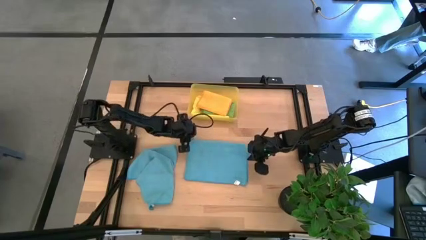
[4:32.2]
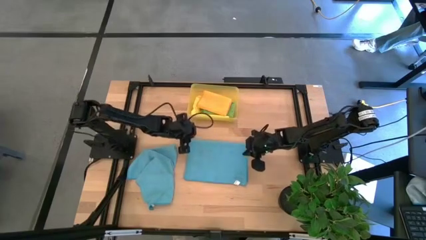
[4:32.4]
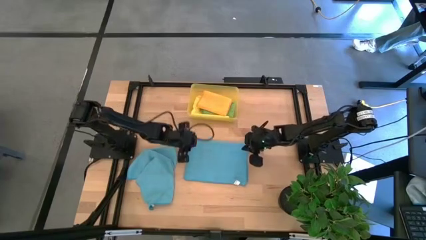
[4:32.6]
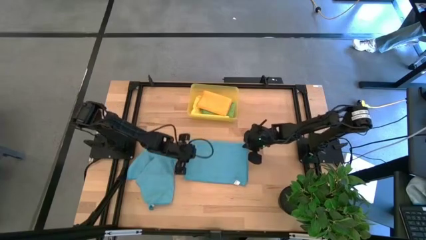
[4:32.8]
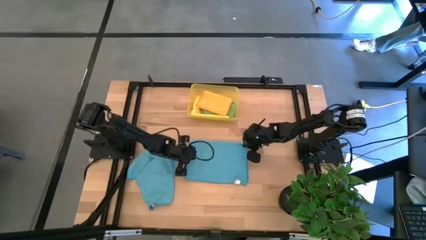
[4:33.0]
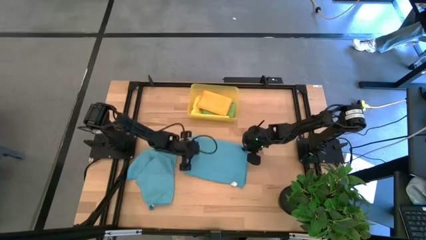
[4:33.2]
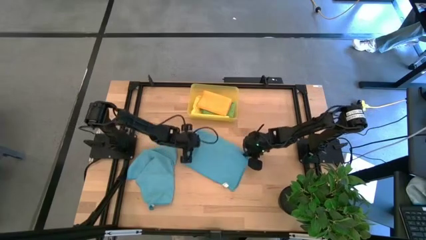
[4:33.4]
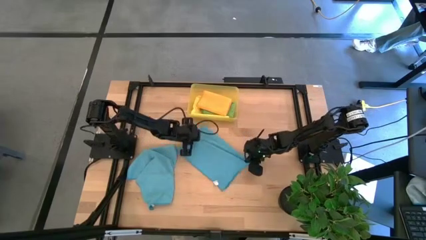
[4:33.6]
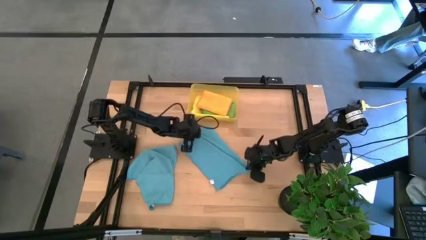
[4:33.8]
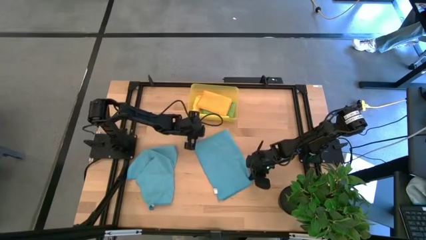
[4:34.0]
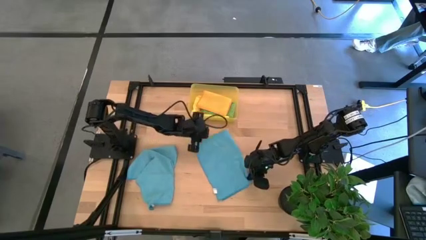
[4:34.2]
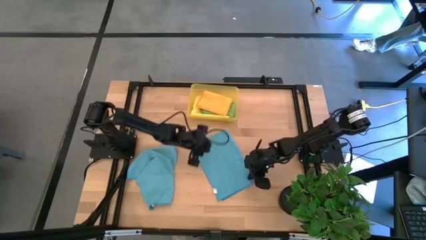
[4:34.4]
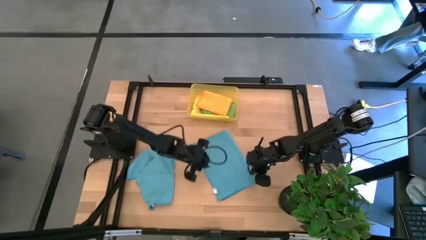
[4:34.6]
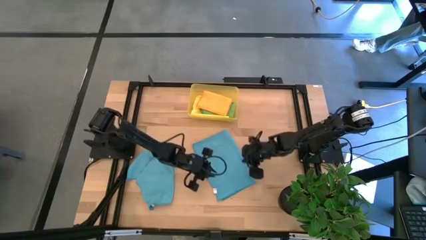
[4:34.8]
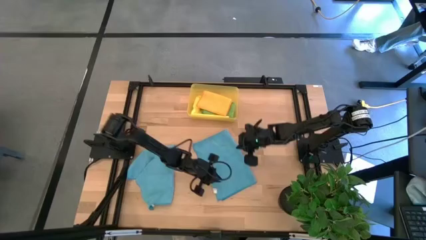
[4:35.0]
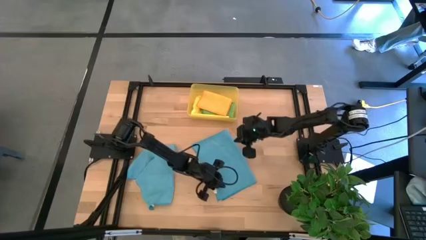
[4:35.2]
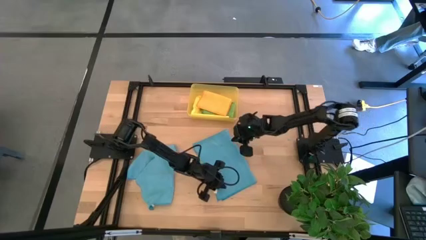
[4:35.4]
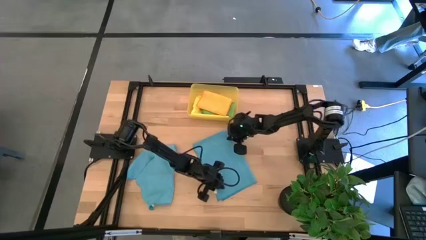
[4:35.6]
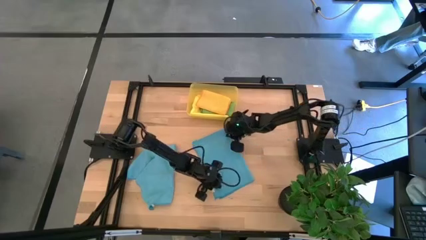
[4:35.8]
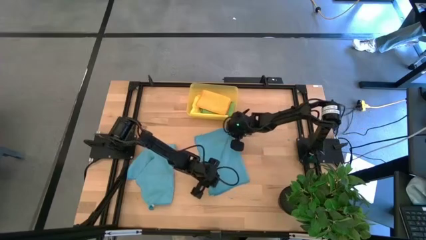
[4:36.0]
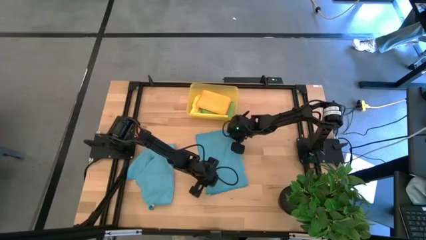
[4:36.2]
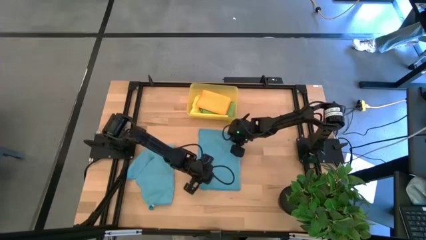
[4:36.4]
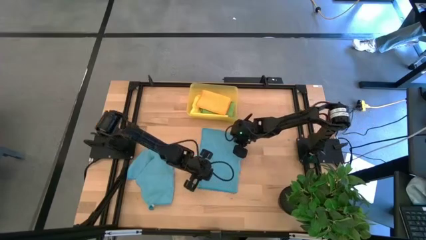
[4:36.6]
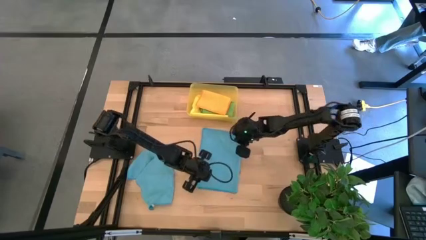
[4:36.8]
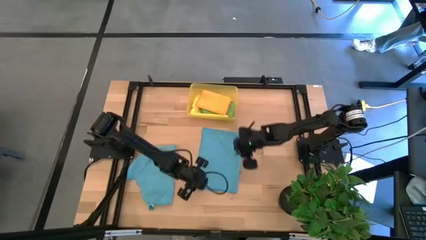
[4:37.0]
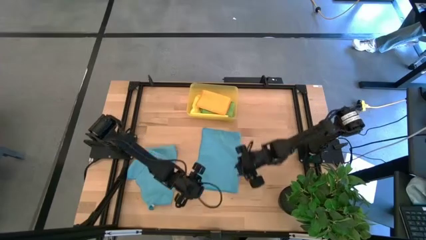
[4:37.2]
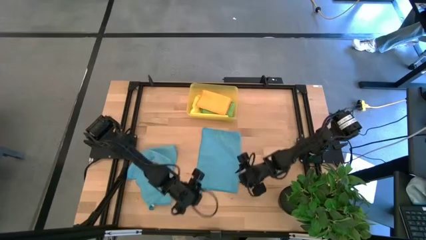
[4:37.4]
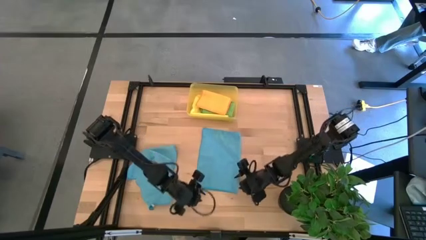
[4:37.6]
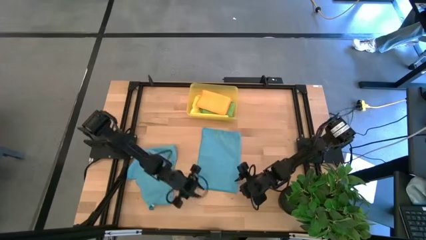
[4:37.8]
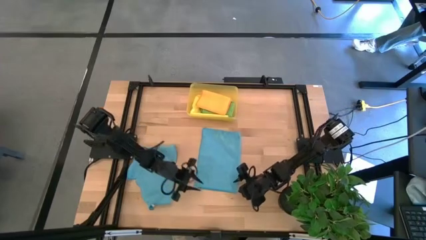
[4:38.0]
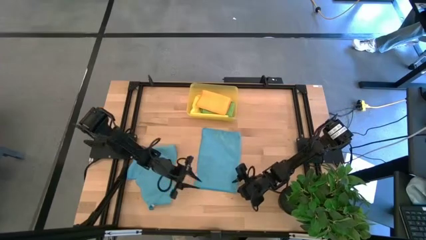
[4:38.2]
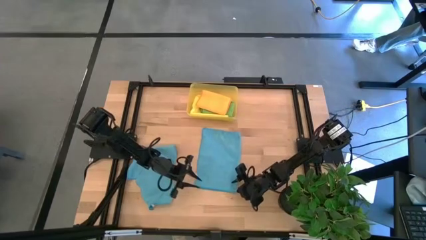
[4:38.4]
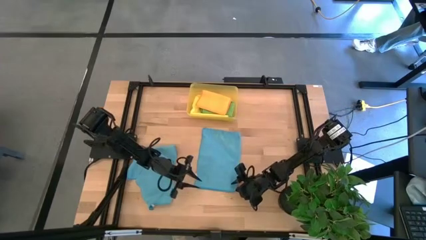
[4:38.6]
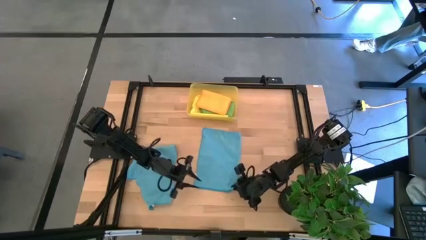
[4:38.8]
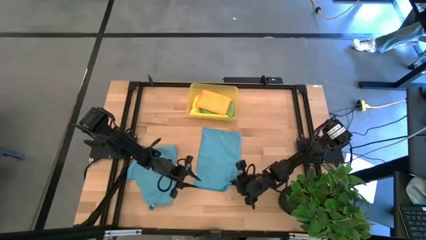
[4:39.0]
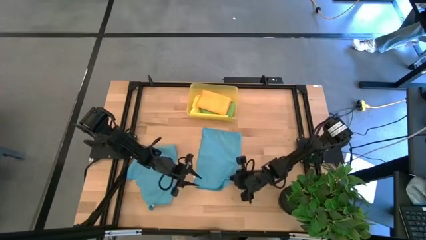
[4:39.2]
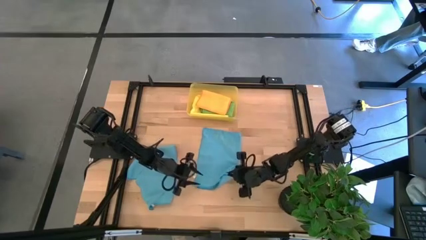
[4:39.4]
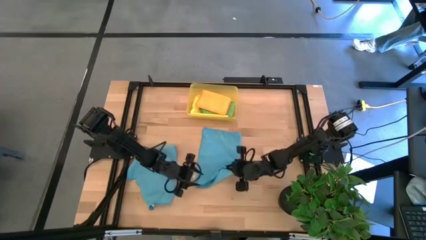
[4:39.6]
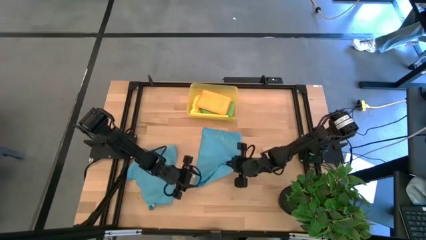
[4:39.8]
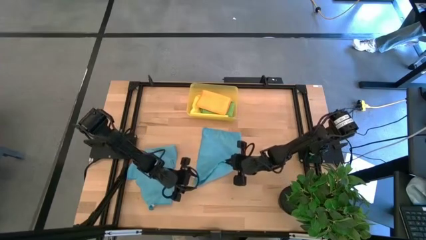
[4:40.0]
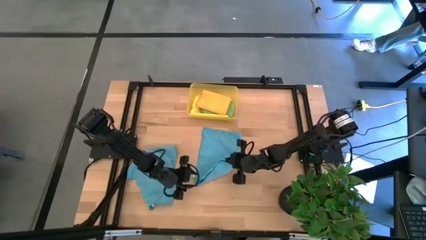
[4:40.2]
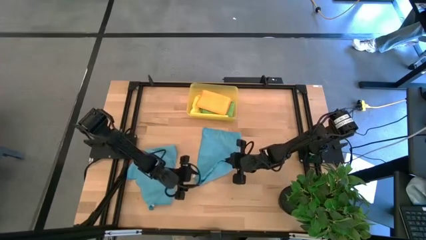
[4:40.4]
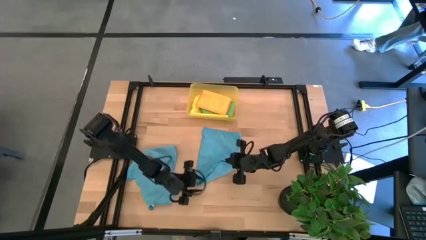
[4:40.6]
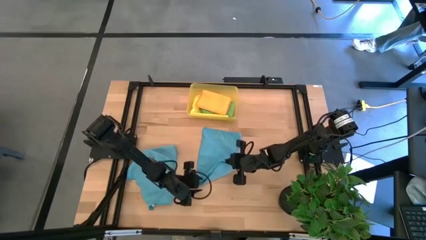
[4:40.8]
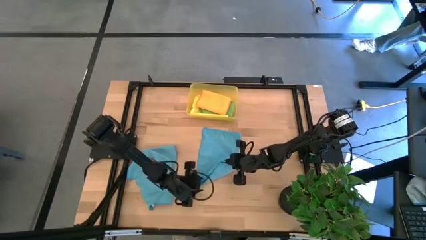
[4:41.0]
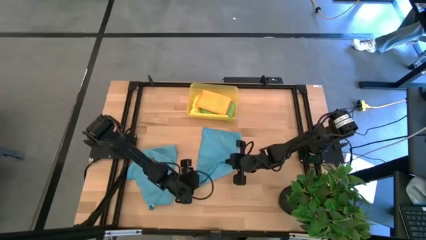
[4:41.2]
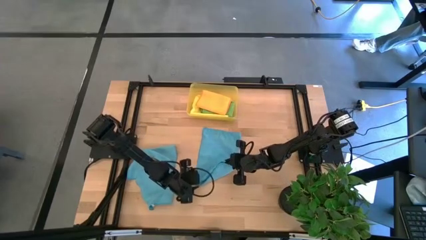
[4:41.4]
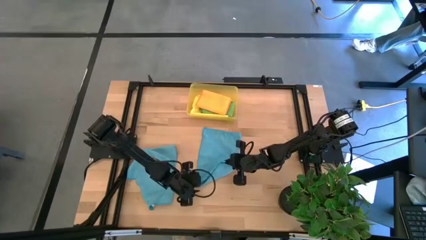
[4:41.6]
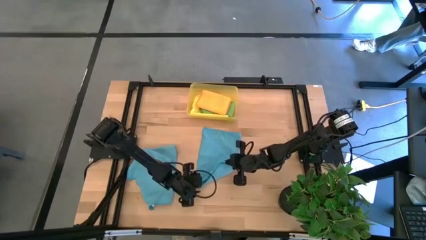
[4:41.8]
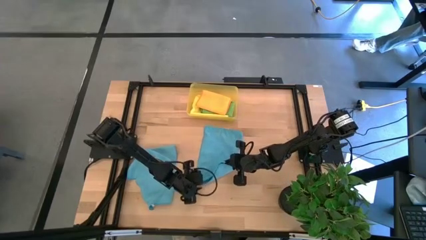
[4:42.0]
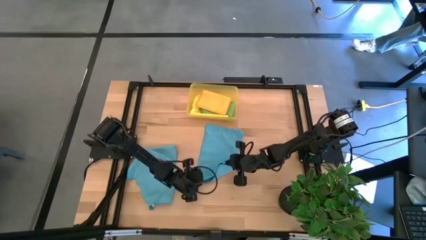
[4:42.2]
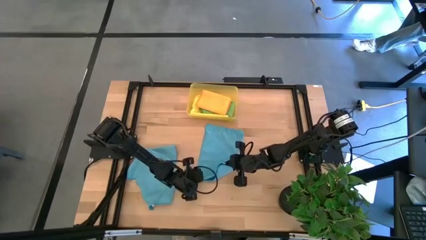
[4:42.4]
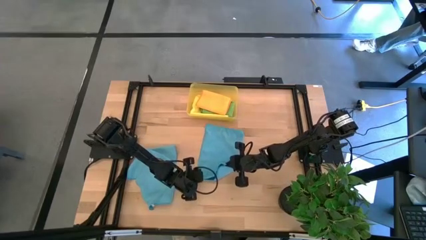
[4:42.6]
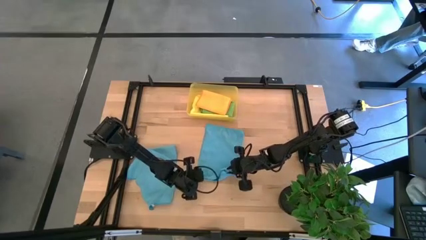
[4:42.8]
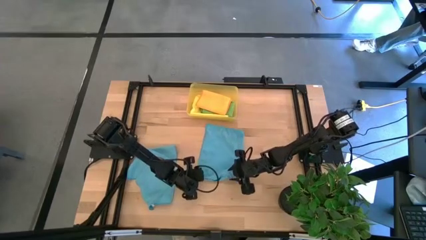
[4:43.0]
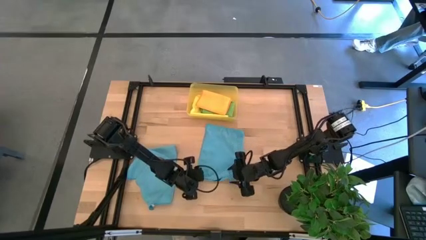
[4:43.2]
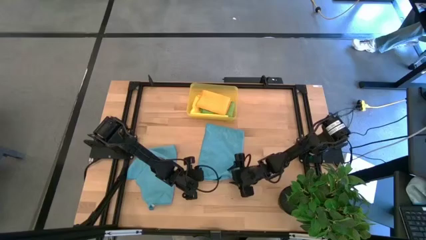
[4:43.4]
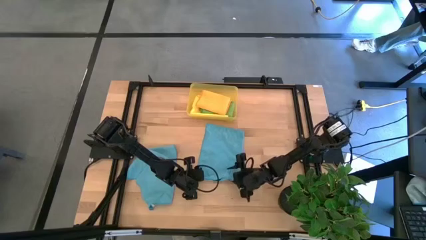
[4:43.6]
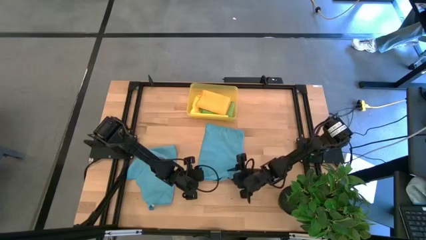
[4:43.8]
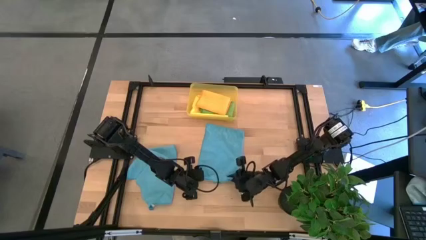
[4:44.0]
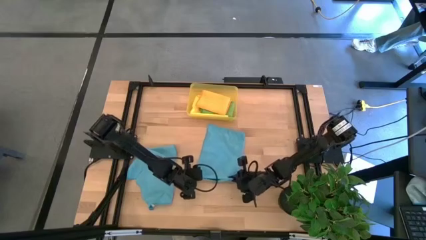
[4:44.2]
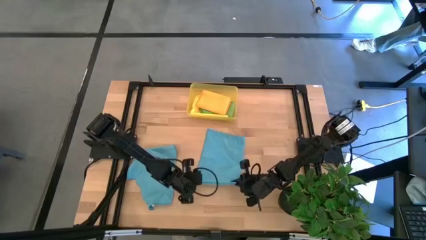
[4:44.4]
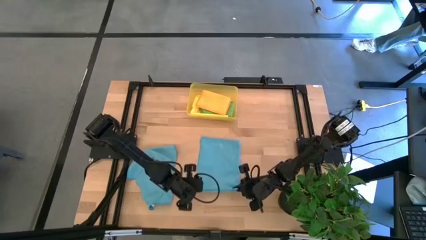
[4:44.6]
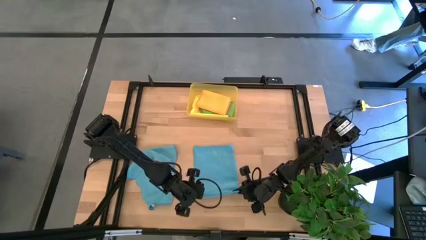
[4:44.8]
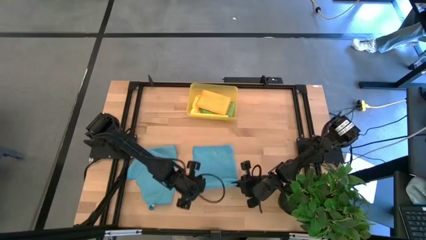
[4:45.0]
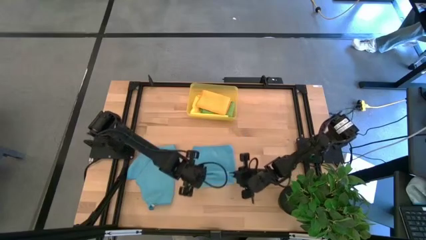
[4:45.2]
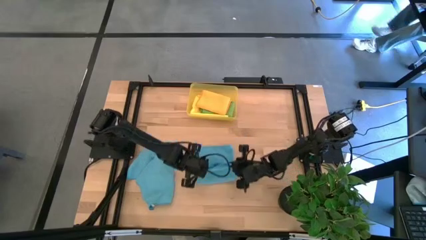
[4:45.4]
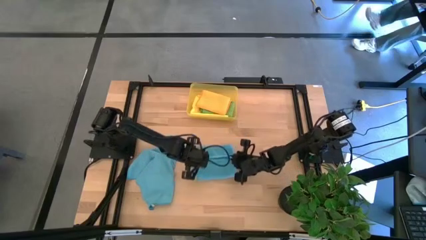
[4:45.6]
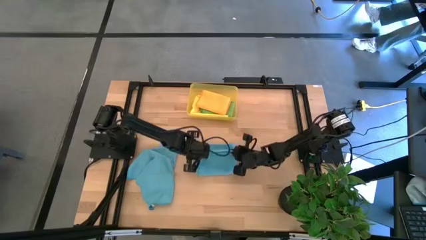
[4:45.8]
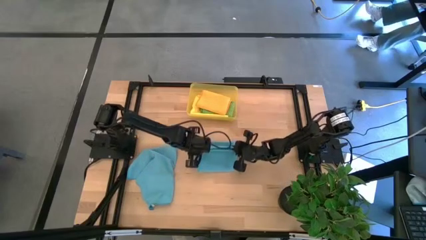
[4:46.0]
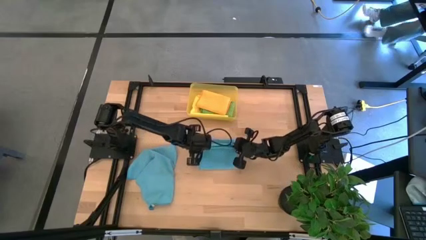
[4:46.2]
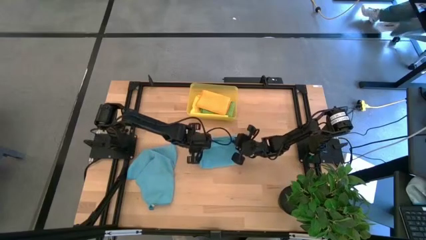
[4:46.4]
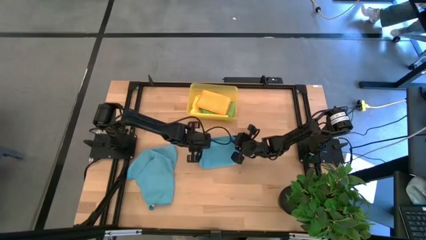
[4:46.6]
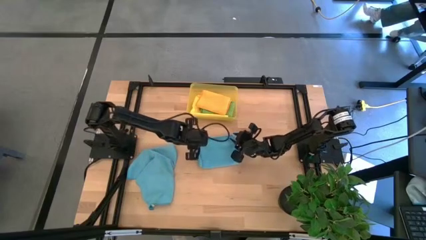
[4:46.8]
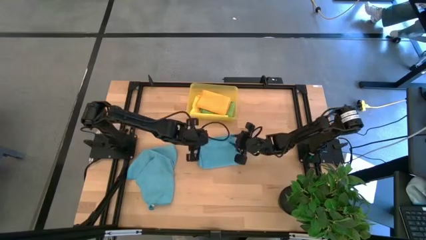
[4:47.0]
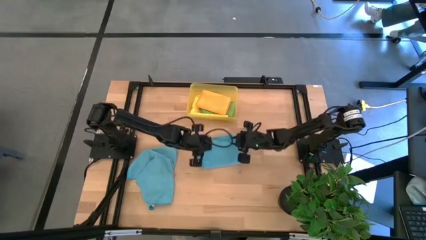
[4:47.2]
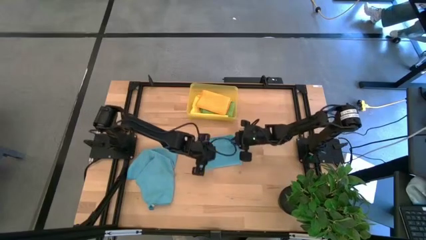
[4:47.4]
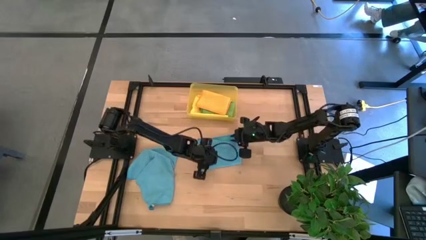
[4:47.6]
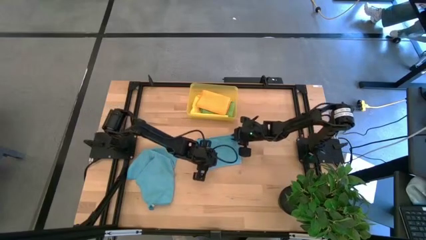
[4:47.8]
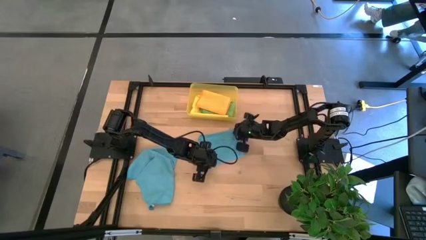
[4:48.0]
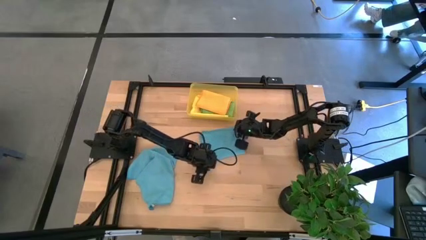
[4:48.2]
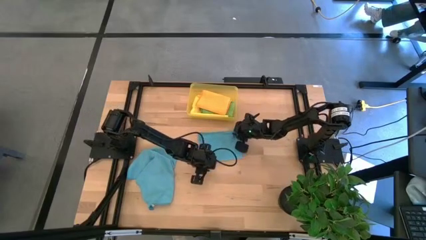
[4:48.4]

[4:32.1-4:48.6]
Task: Fold microfiber towels
Fold the right blue towel
